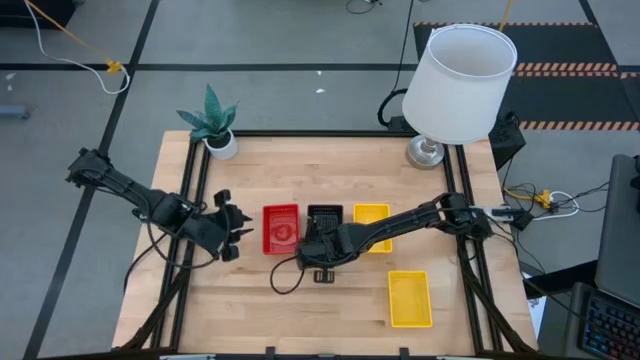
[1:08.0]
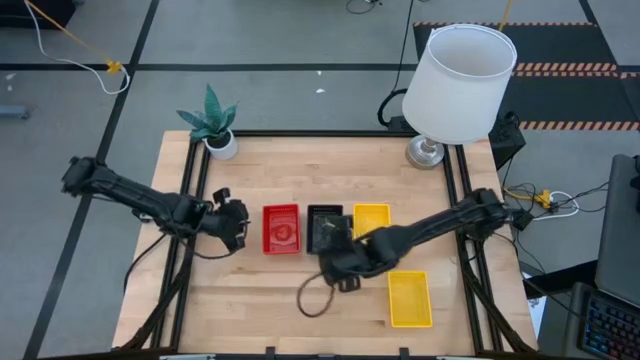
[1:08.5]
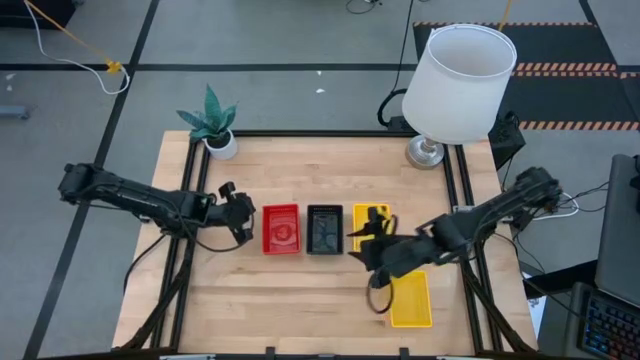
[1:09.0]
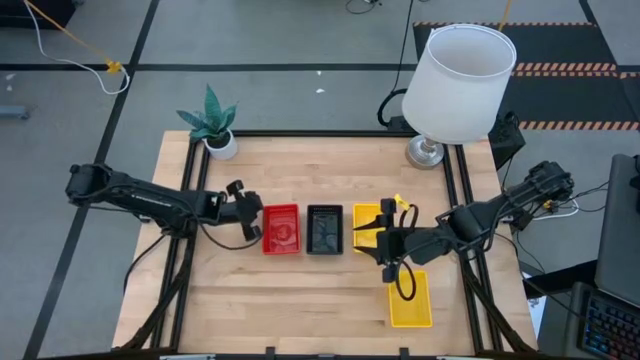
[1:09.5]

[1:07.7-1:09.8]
Adjust the red bin

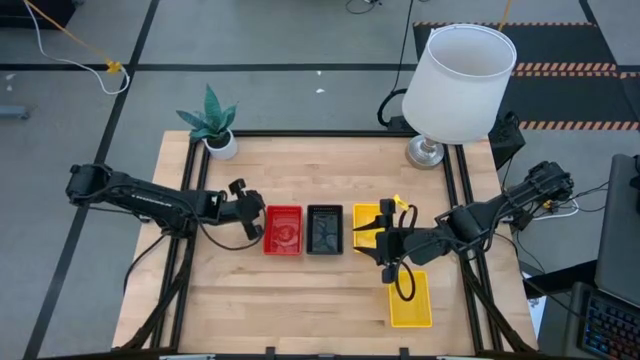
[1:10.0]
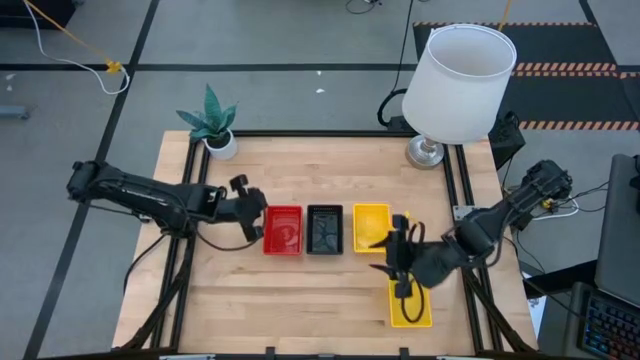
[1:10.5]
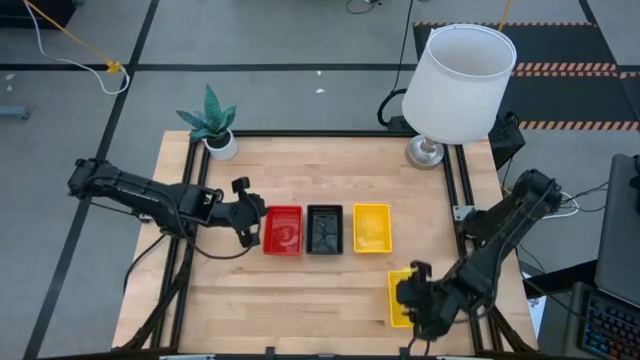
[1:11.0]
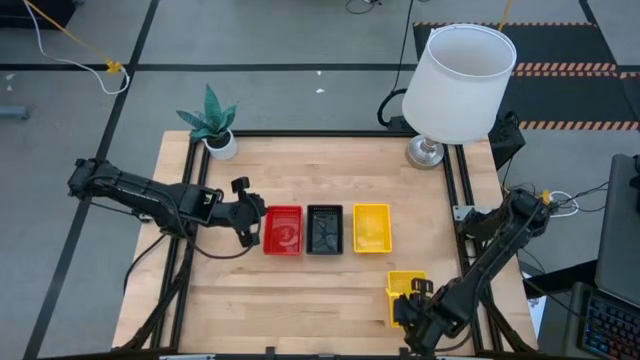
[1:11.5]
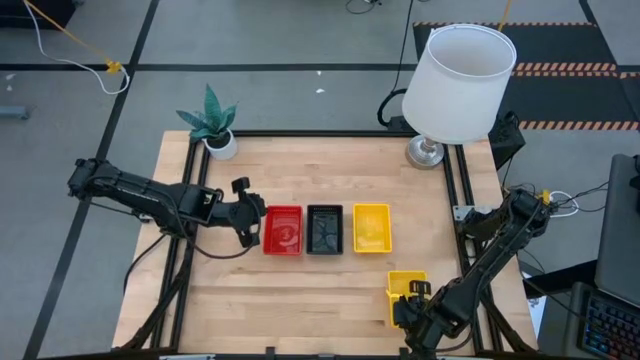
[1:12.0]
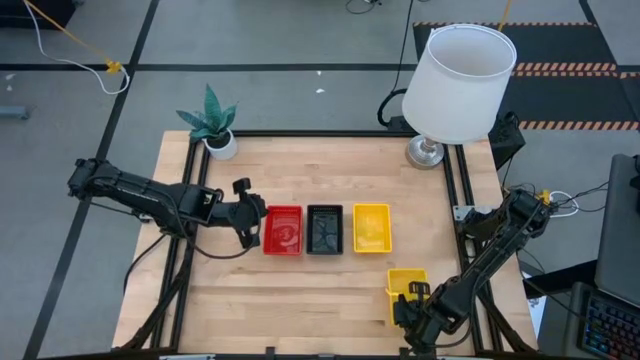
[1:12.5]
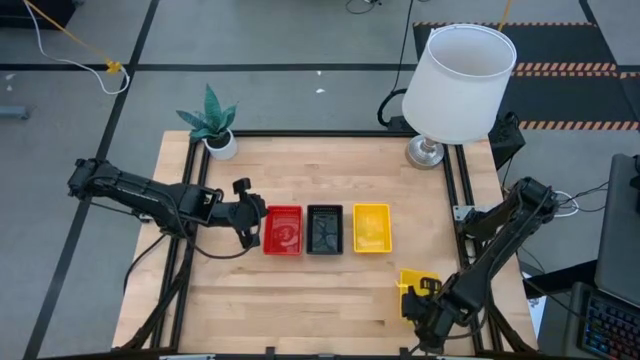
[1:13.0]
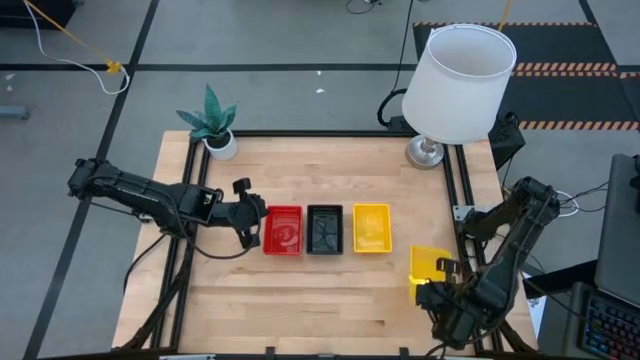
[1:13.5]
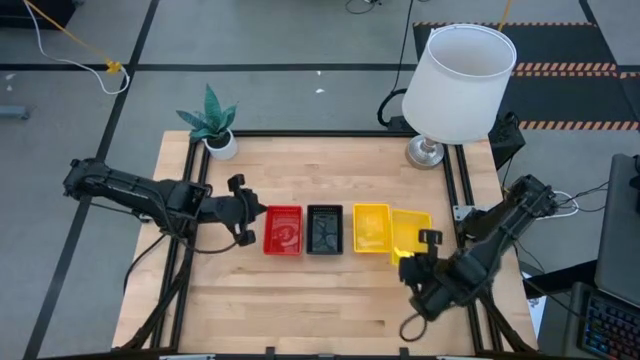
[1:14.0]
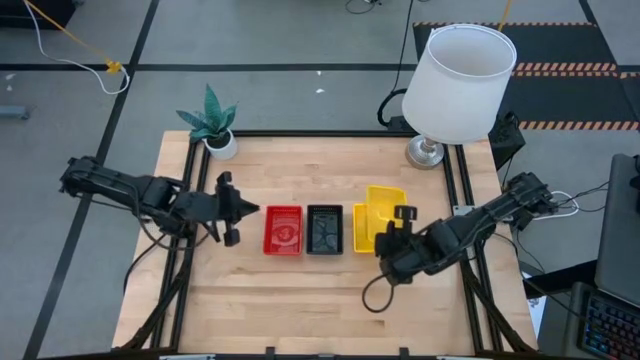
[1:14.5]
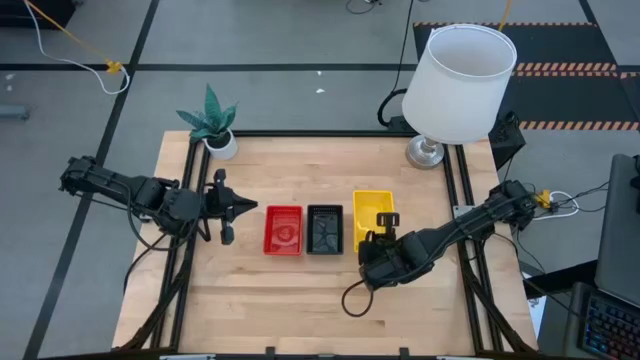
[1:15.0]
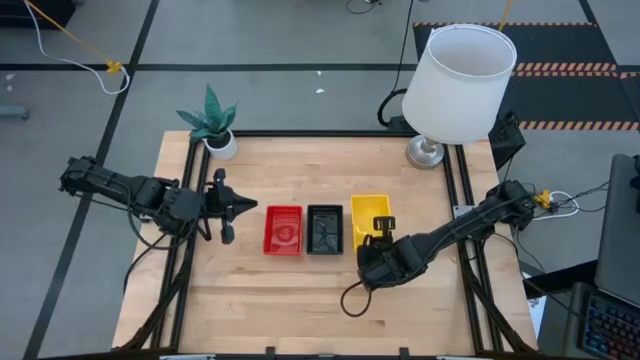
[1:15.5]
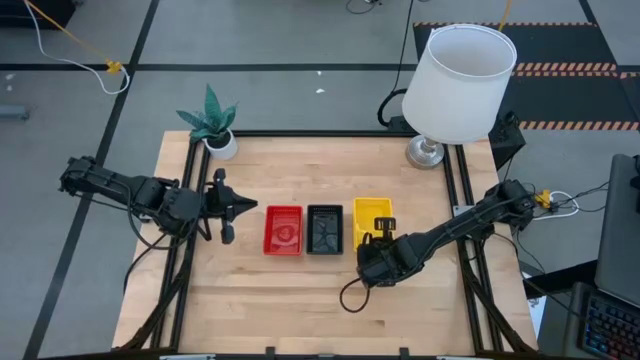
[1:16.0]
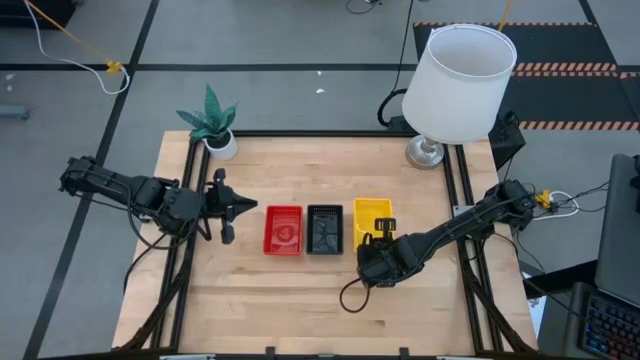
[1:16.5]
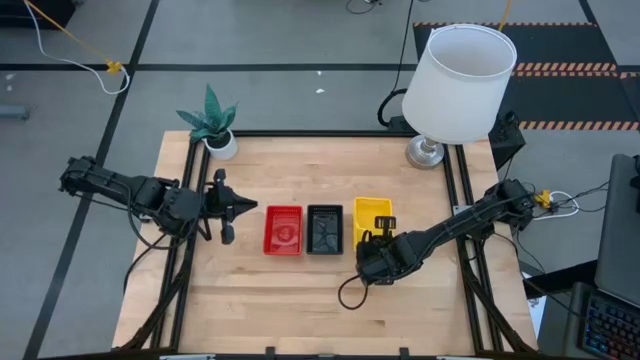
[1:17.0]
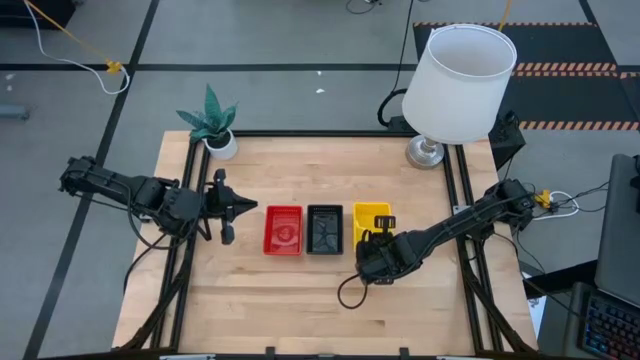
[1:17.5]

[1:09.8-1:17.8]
Stack the bottom yellow bin on top of the top yellow bin

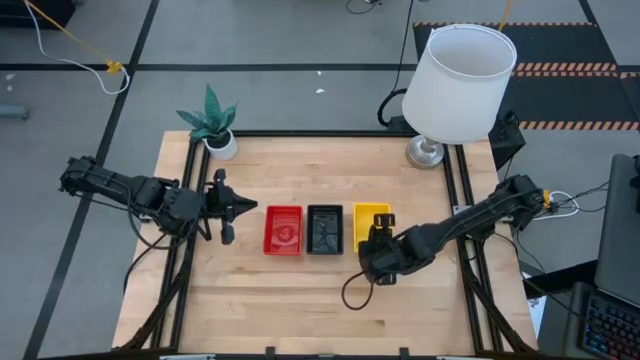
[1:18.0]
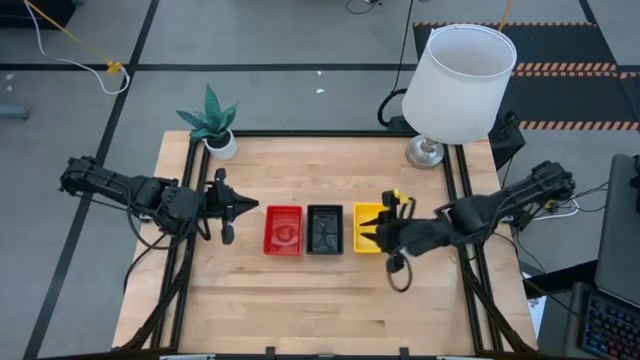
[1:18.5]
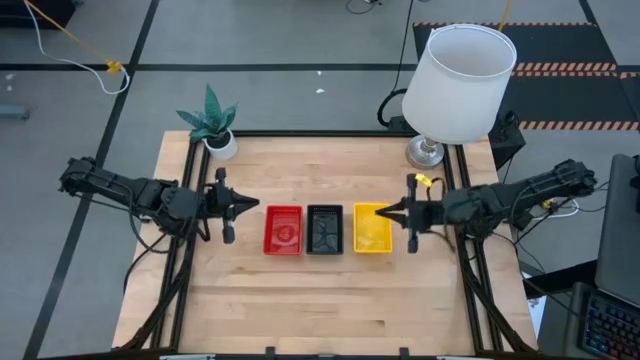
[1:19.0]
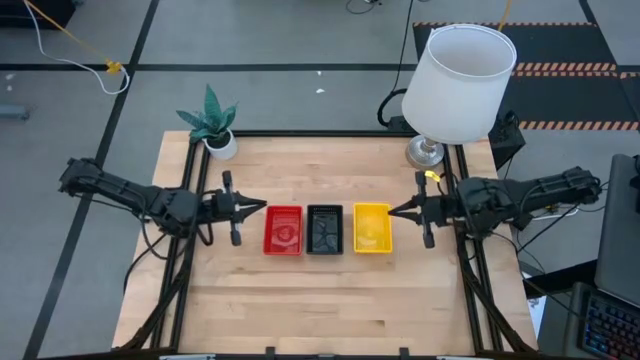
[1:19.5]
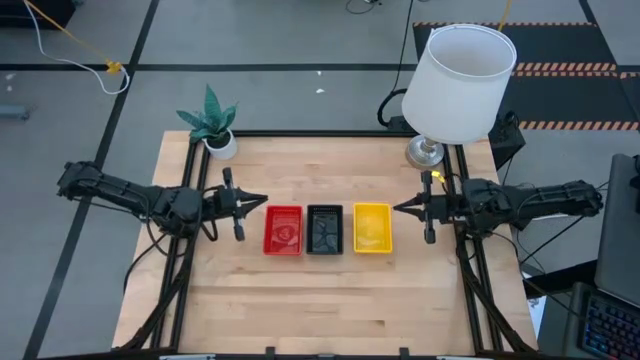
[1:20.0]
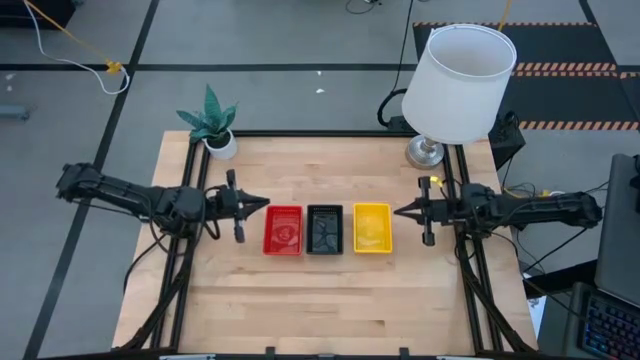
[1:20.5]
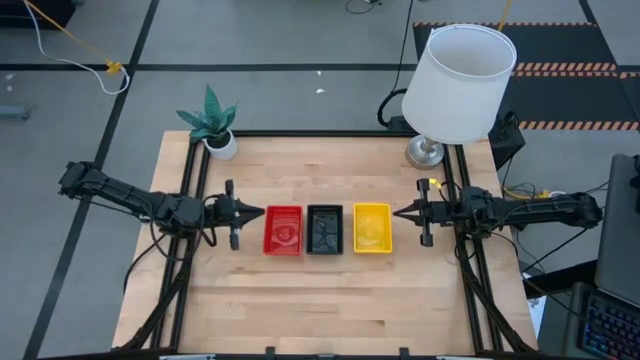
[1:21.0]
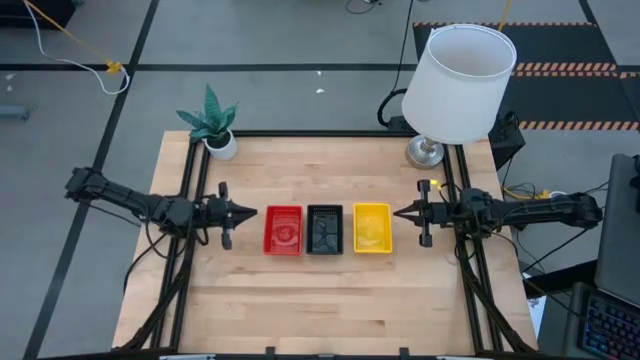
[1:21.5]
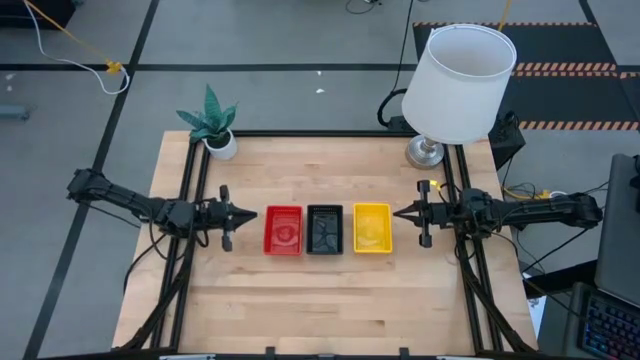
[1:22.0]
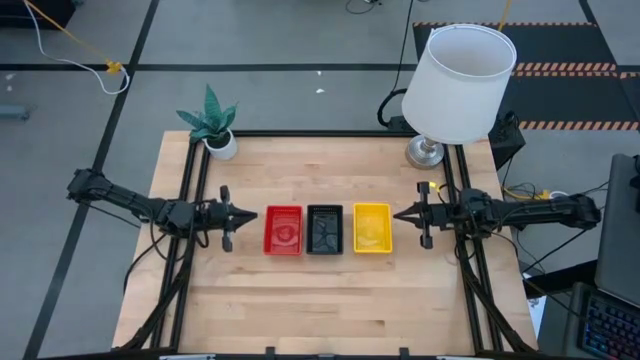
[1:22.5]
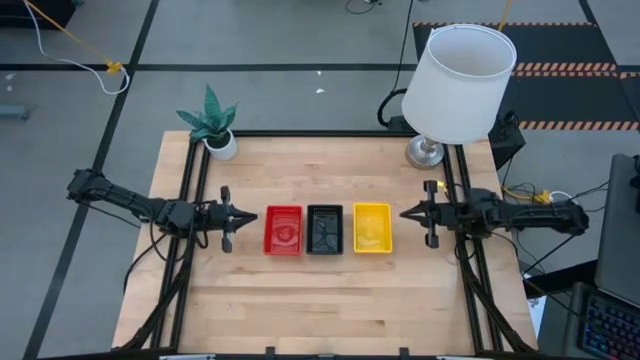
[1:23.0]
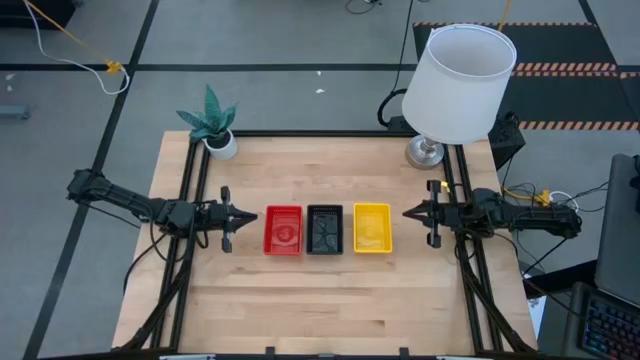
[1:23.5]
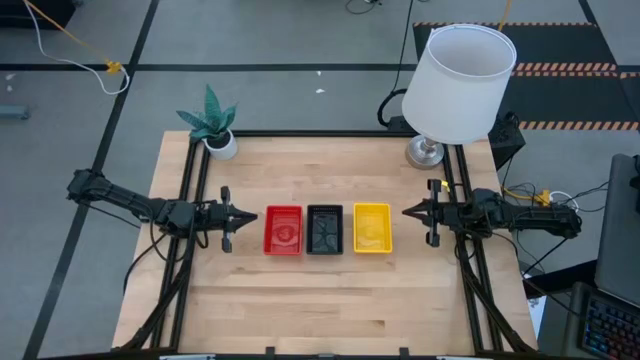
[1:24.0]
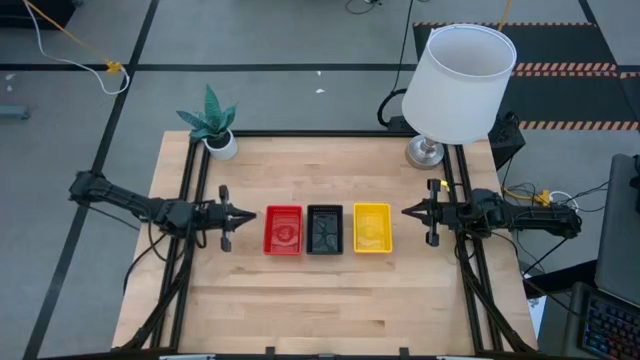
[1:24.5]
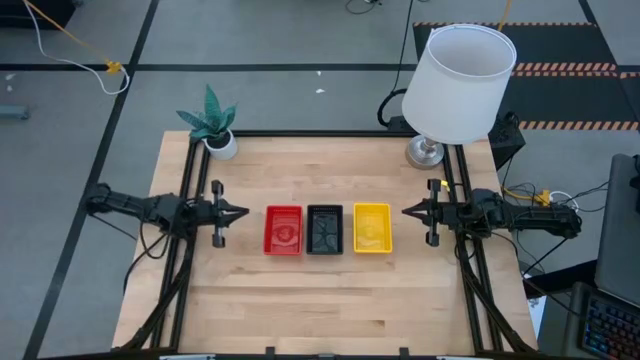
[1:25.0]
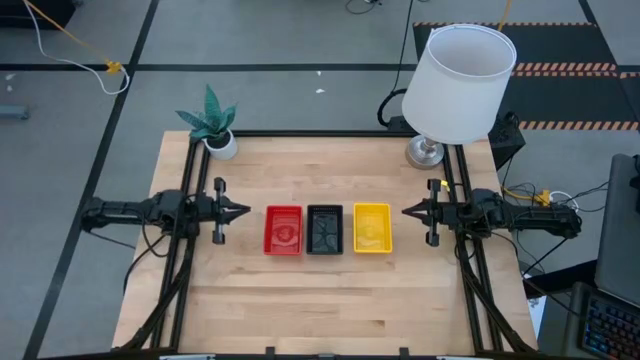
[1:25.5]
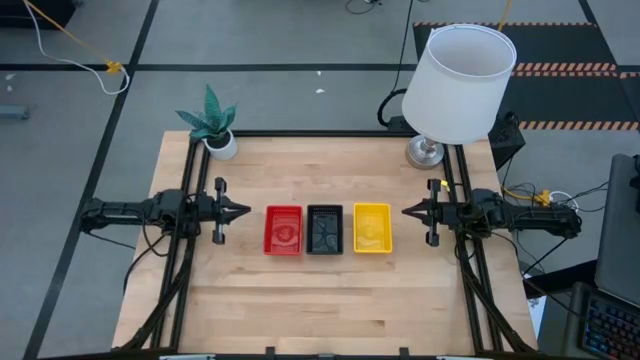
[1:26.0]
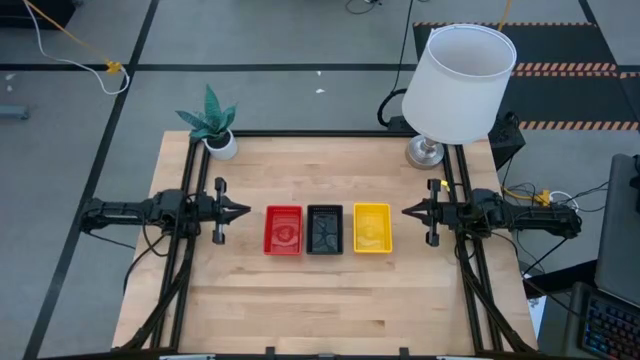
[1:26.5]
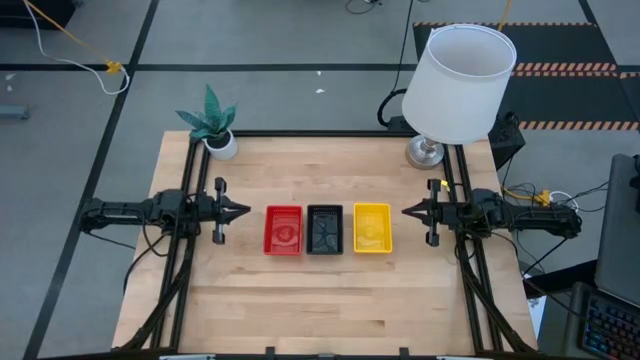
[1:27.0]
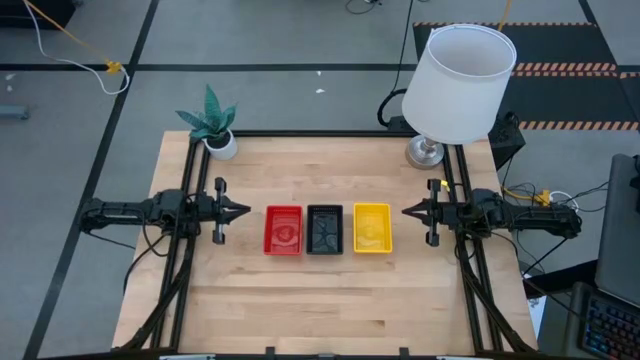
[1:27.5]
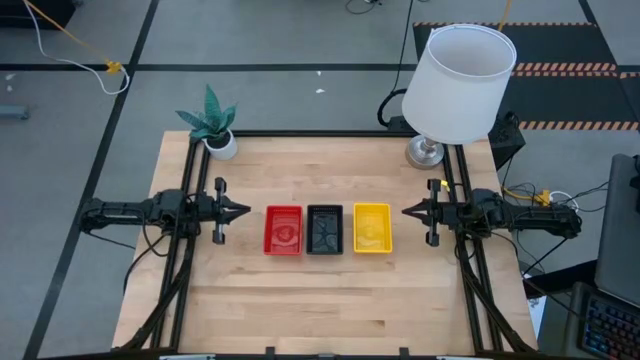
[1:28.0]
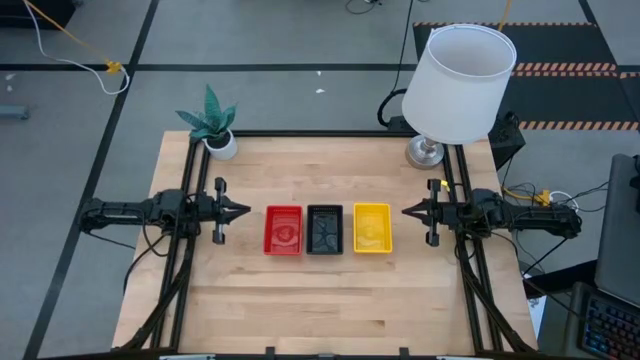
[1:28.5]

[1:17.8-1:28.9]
Return to Home Position
